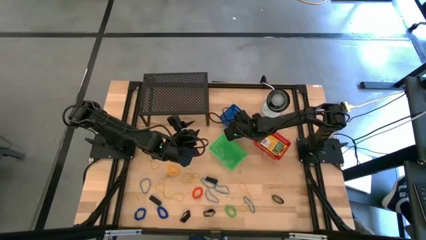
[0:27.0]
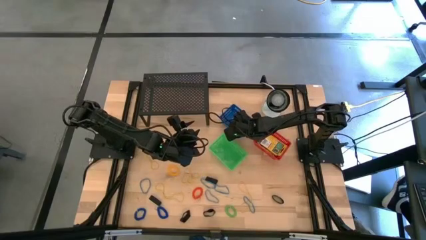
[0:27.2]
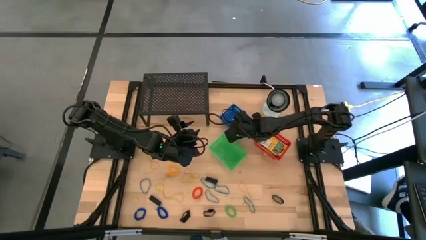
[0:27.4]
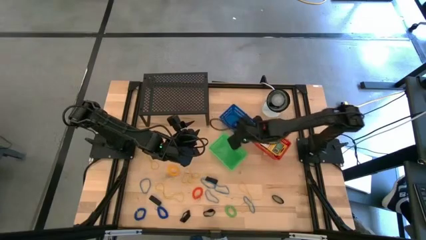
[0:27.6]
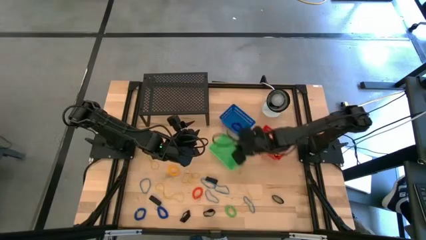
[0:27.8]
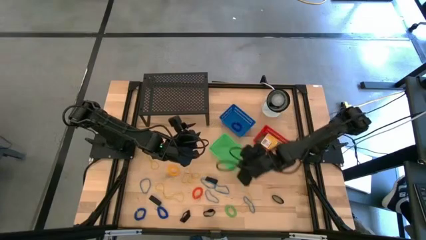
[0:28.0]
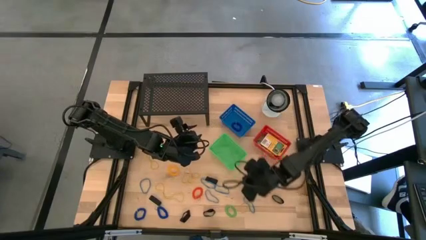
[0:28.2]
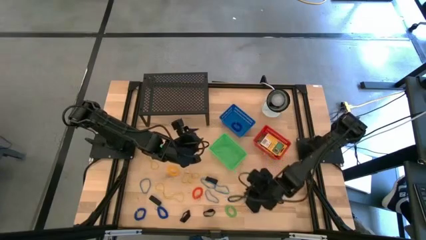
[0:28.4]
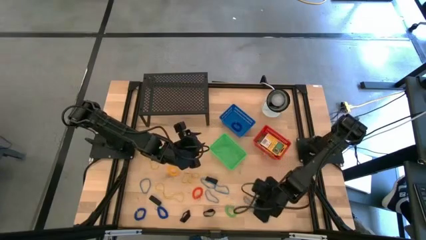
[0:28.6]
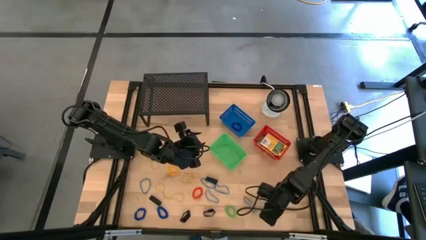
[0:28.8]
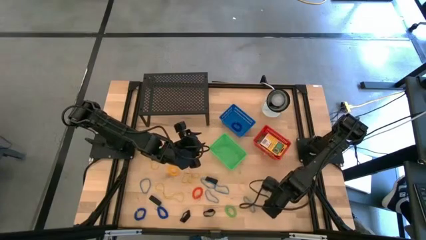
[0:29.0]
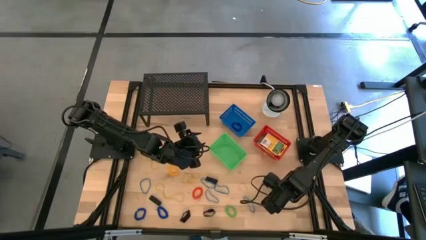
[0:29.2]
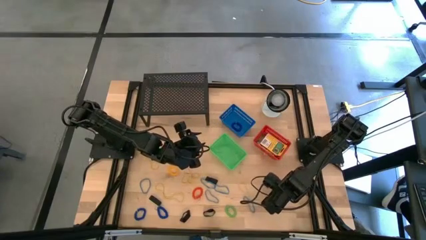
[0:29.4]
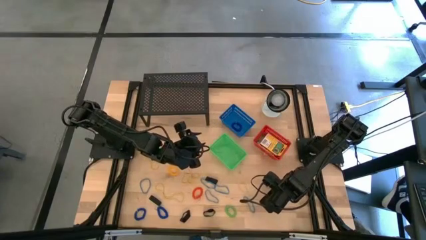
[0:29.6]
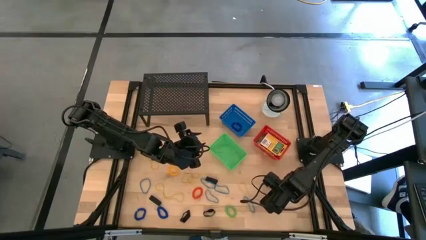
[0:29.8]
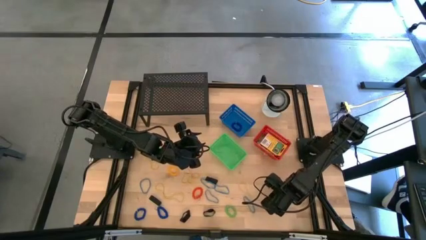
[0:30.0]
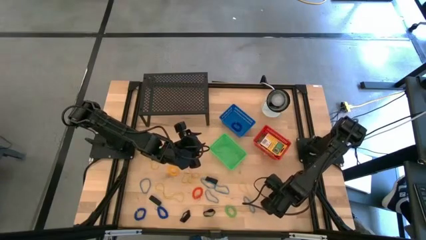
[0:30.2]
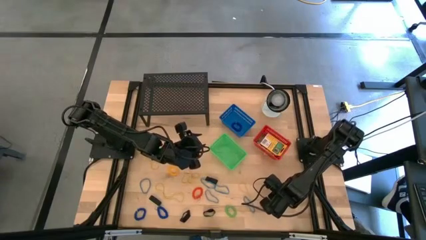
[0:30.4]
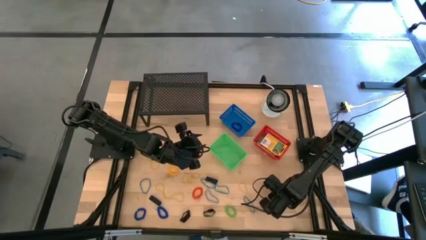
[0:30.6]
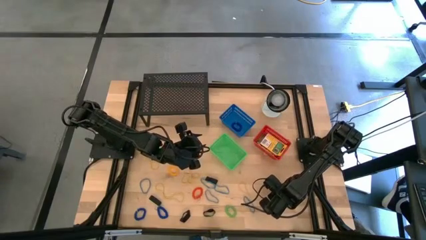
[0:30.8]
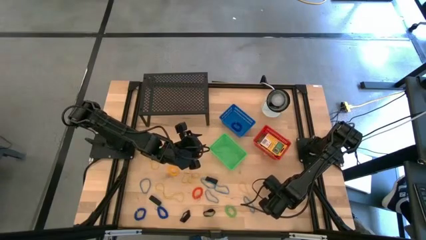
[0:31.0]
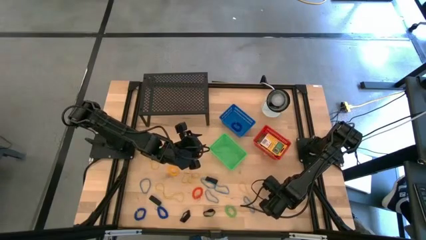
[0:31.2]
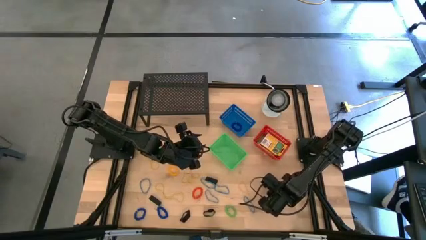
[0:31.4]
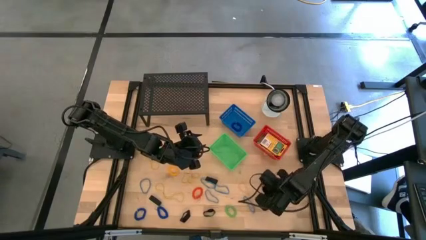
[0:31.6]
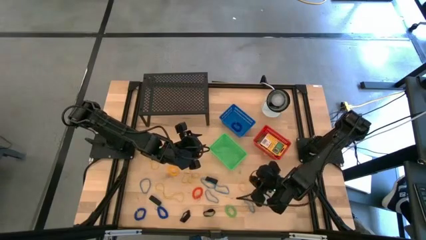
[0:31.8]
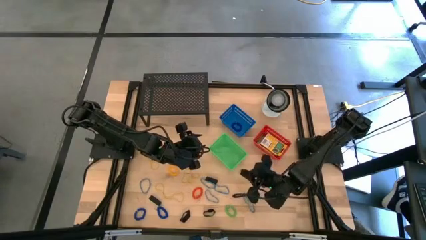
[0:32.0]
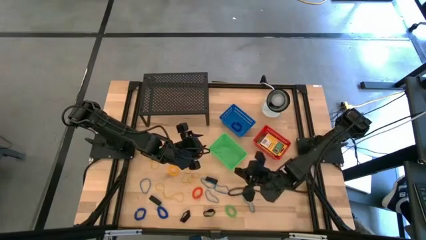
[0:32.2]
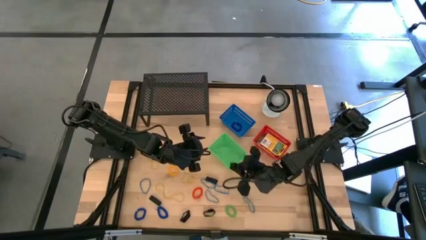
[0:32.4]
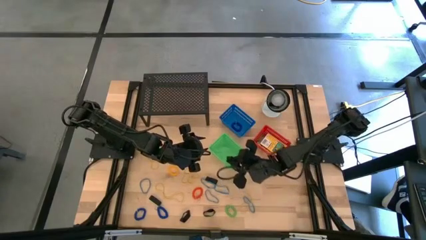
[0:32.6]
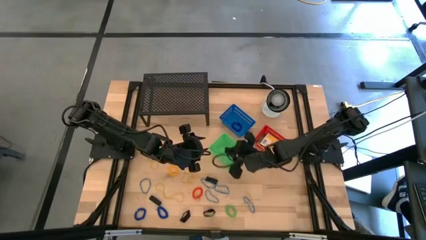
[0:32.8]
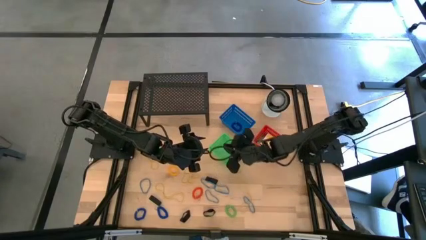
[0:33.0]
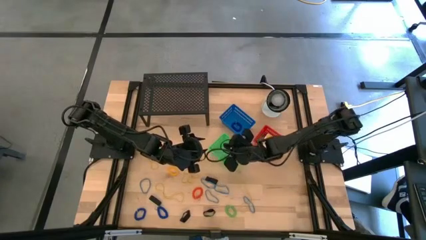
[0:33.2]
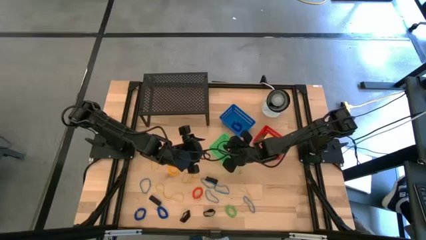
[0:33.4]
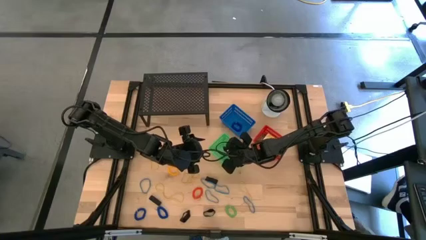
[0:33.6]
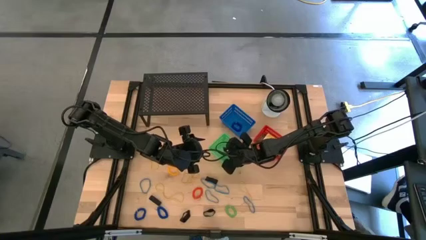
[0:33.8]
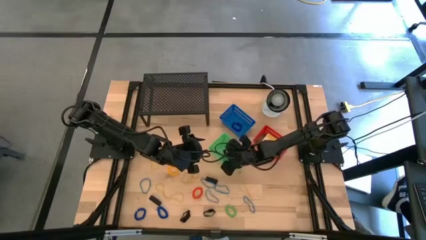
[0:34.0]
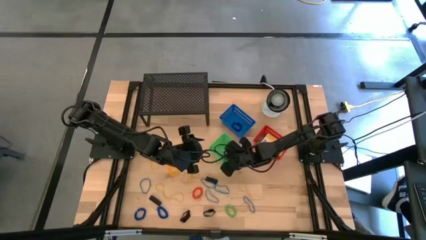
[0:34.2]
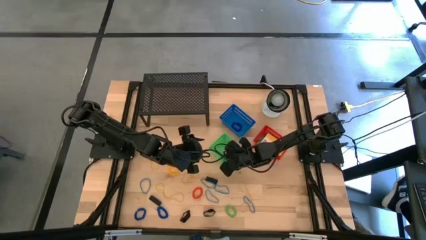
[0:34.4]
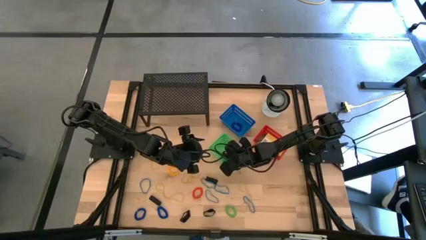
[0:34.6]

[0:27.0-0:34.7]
Task: Pick & Place Office Desk Supplies
Put the black rubber band into the green basket

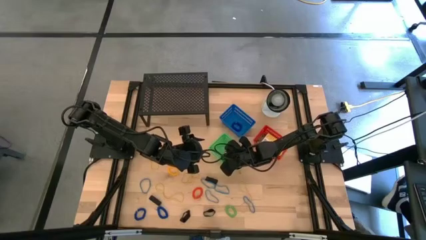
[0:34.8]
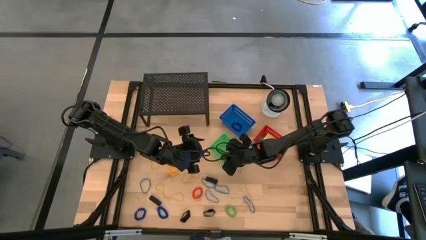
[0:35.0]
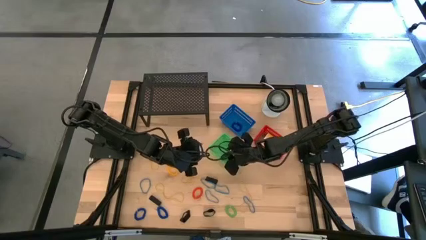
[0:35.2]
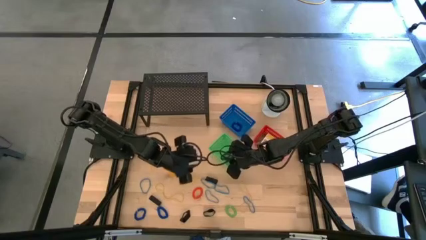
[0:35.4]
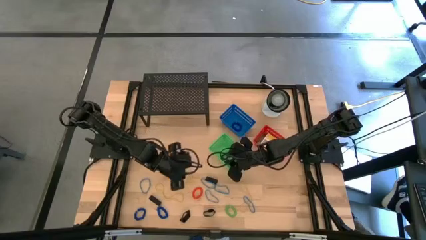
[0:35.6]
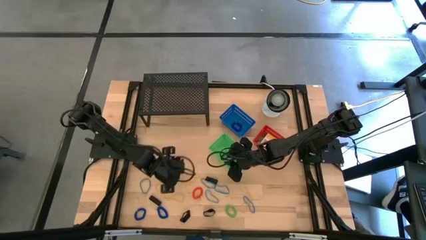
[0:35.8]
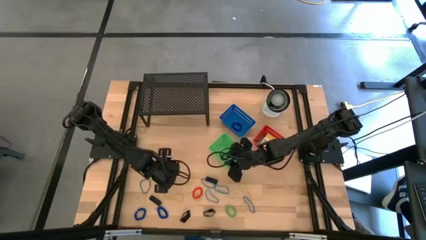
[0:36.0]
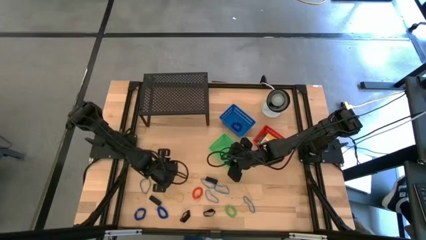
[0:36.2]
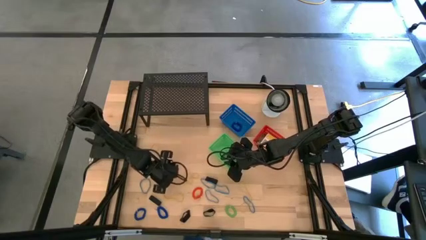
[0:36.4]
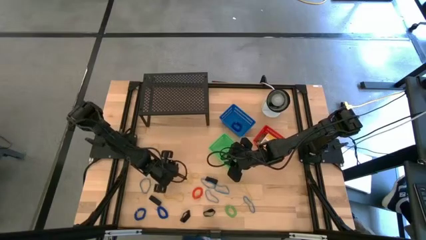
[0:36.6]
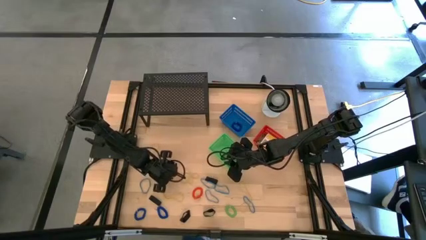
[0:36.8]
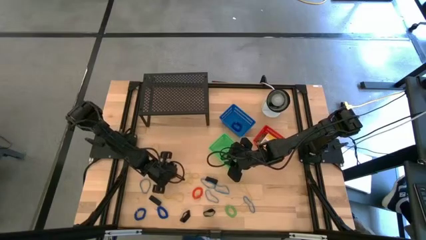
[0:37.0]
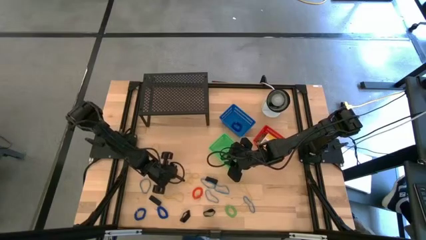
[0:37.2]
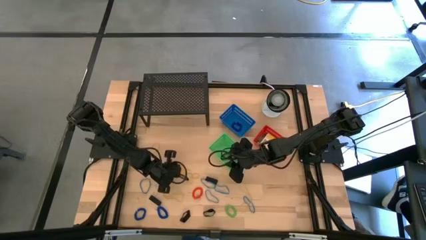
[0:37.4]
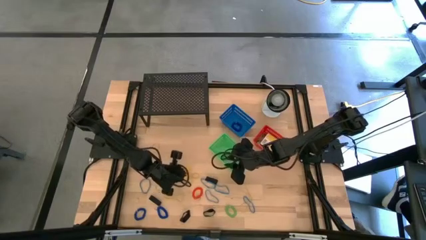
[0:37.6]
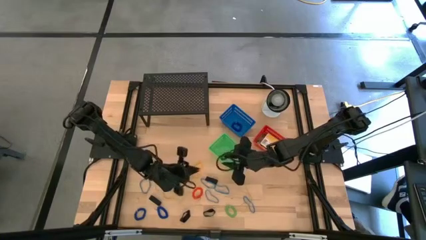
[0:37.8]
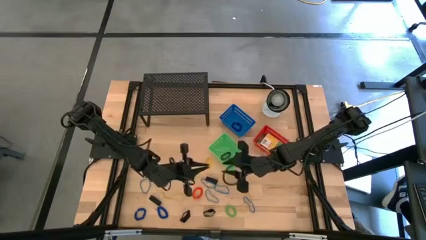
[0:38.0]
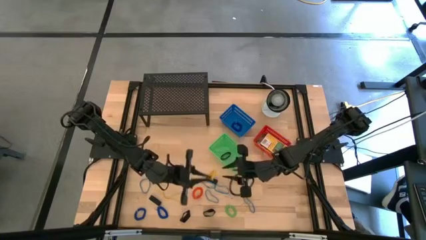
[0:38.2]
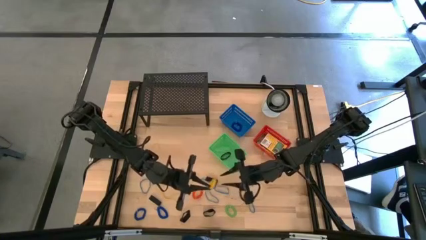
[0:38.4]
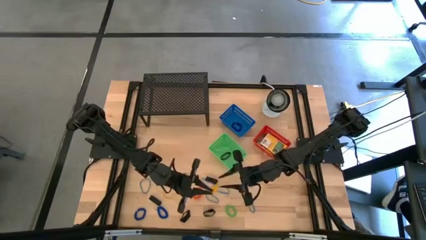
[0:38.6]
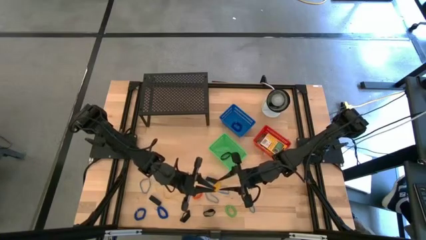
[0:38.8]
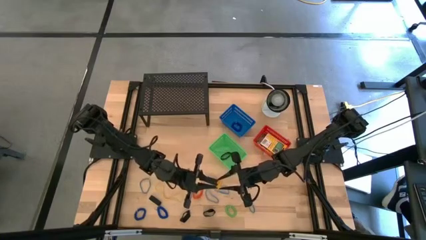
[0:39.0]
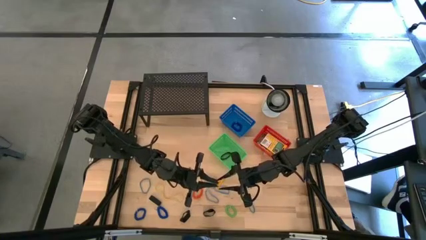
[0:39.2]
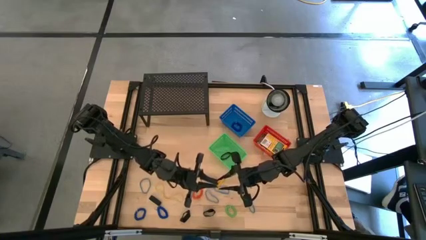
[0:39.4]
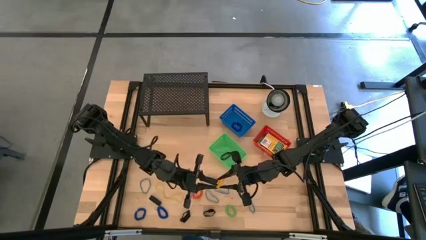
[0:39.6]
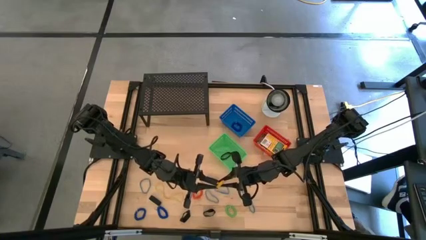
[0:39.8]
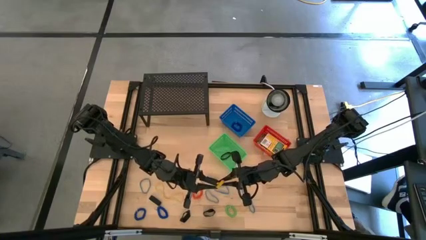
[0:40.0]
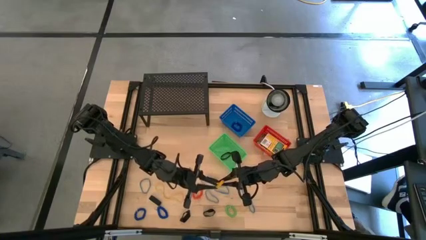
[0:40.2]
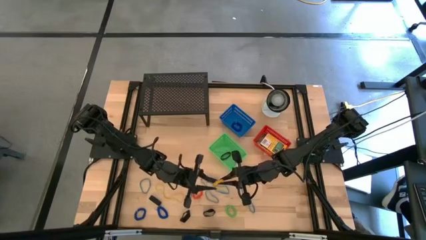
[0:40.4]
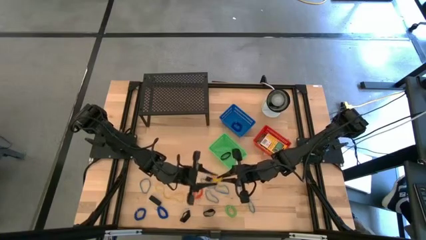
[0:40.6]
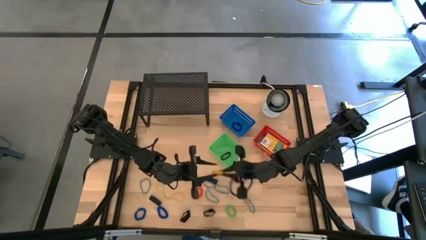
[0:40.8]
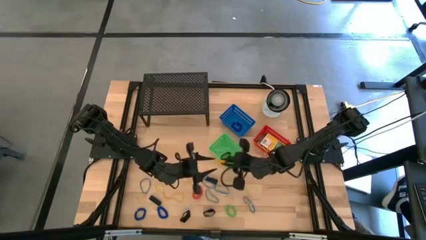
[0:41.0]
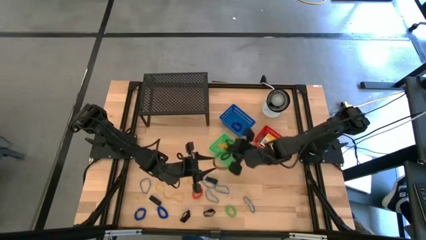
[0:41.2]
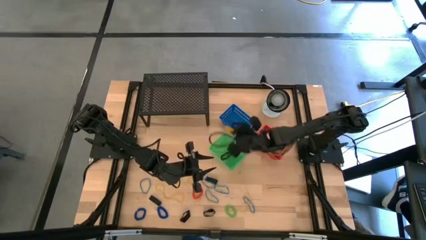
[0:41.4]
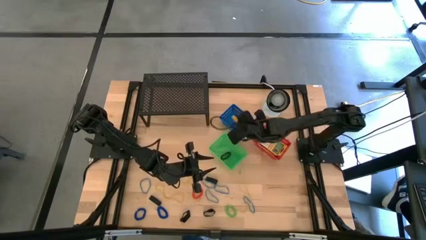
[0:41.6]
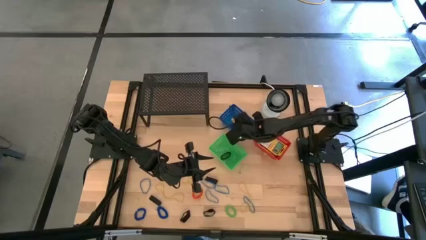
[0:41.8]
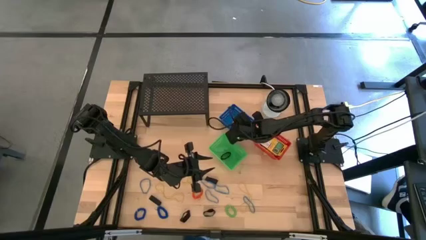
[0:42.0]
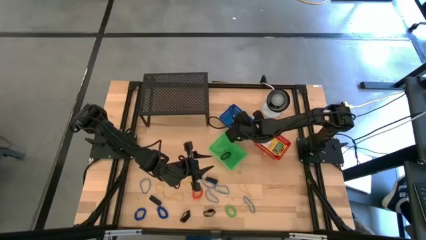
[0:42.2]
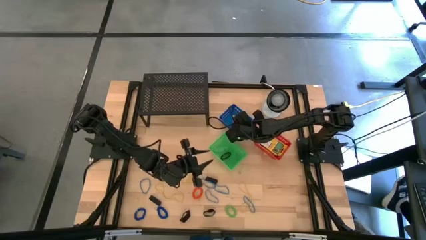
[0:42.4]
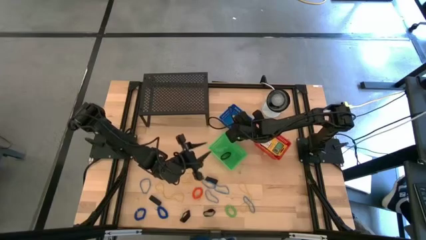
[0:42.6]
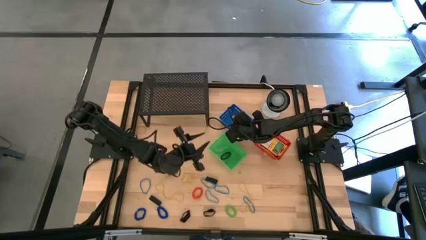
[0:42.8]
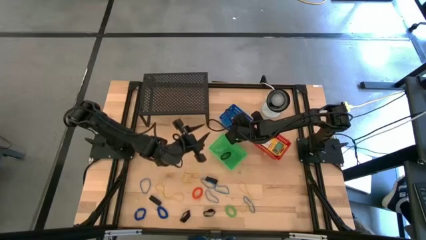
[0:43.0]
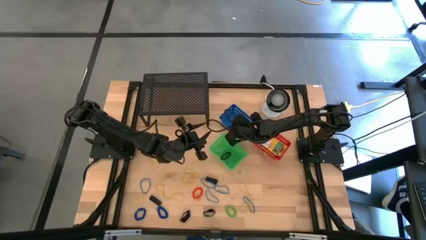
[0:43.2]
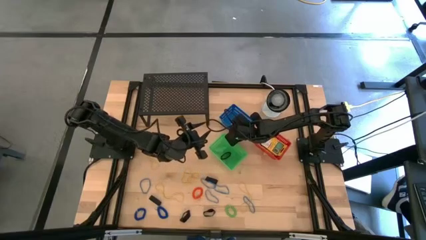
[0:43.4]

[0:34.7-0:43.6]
Put the yellow spring keychain into the blue basket
